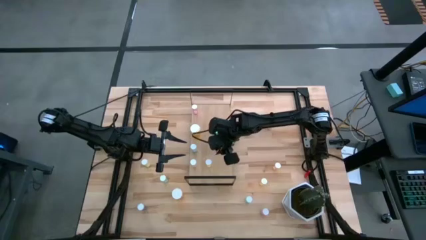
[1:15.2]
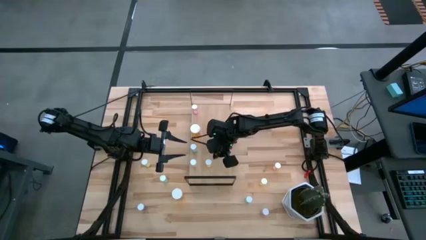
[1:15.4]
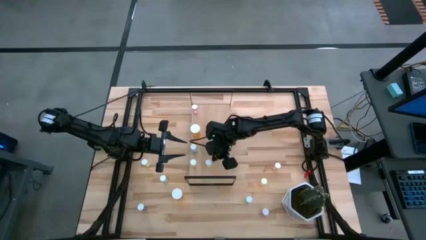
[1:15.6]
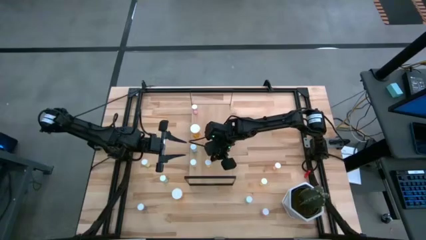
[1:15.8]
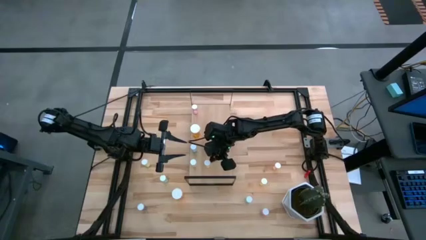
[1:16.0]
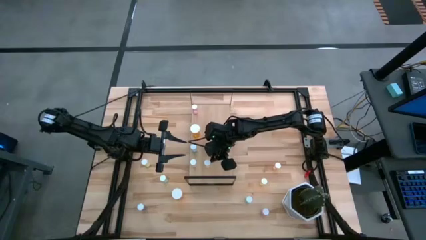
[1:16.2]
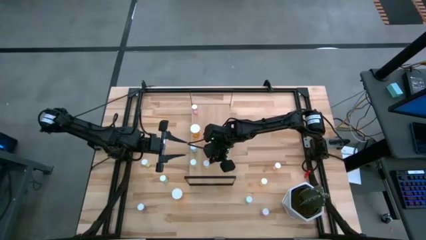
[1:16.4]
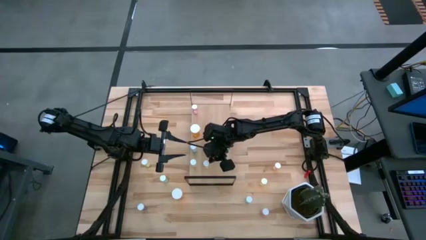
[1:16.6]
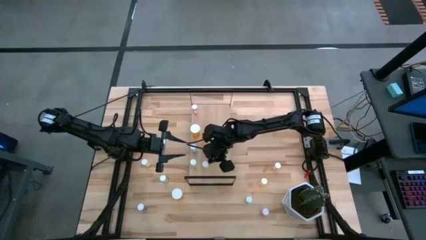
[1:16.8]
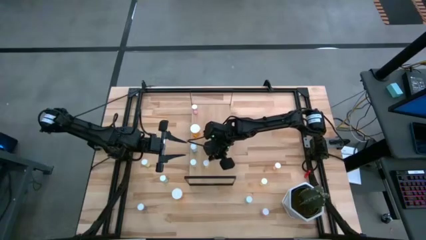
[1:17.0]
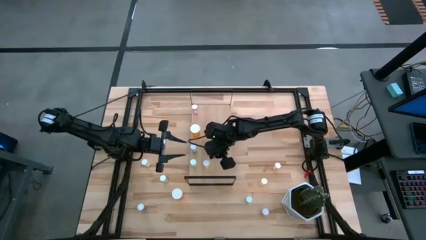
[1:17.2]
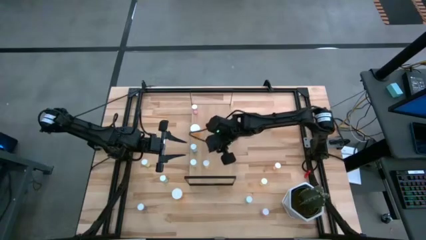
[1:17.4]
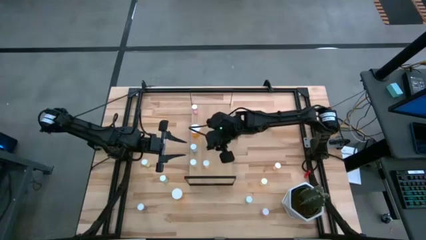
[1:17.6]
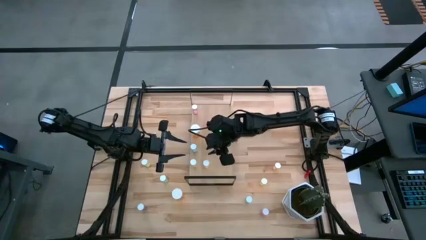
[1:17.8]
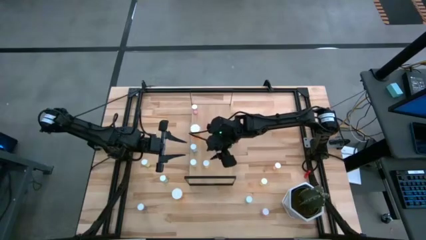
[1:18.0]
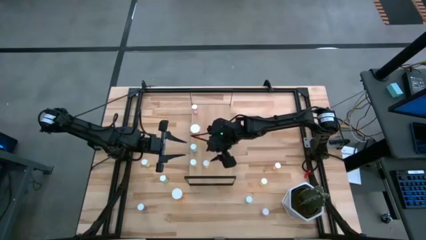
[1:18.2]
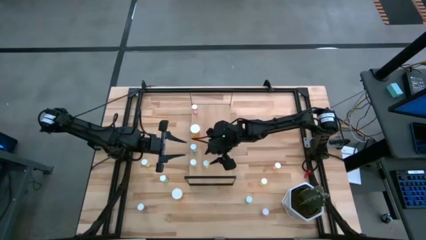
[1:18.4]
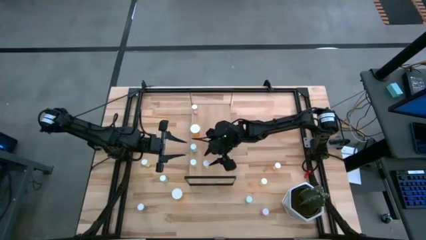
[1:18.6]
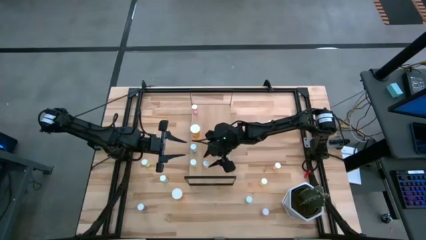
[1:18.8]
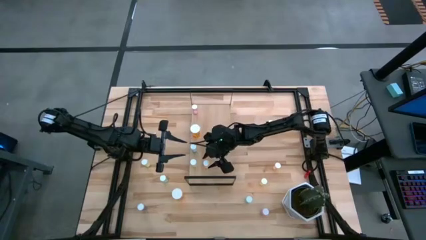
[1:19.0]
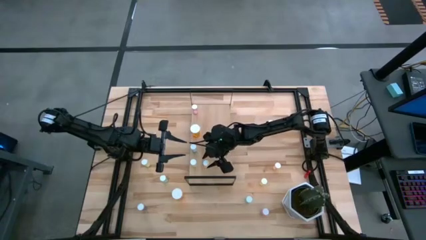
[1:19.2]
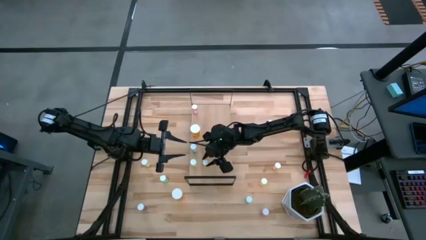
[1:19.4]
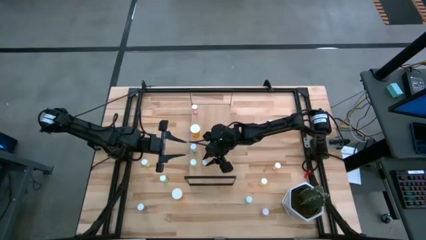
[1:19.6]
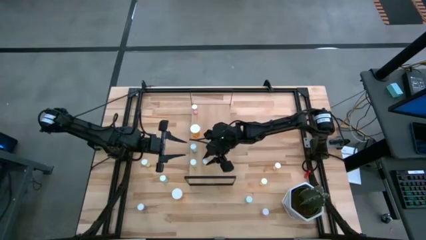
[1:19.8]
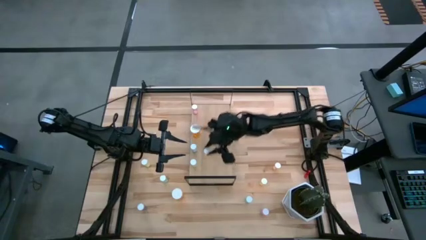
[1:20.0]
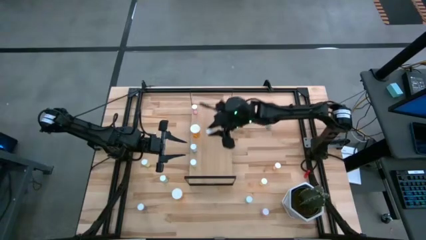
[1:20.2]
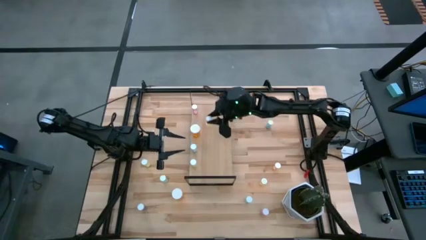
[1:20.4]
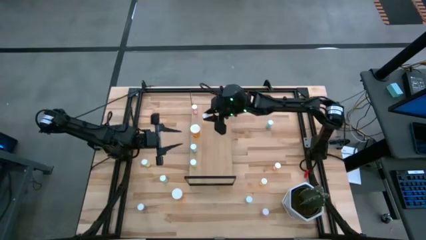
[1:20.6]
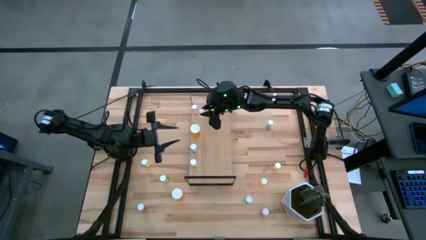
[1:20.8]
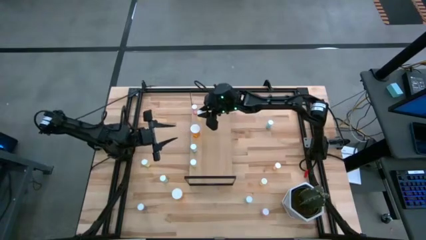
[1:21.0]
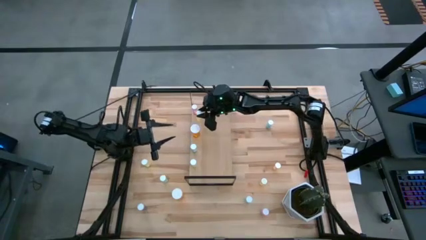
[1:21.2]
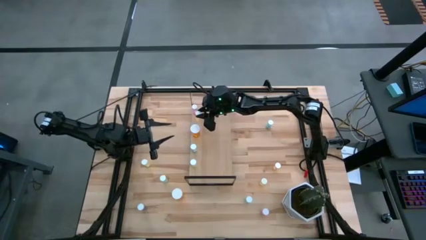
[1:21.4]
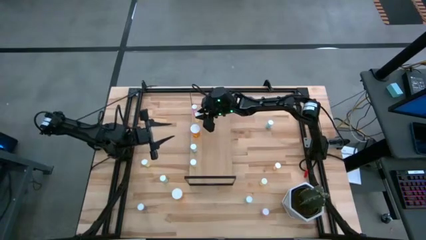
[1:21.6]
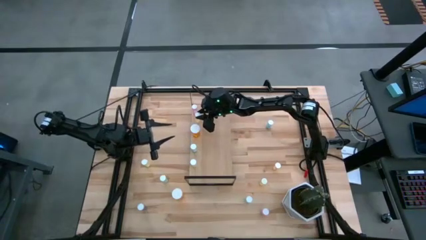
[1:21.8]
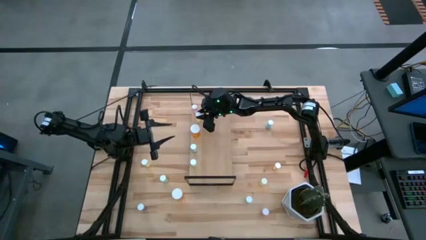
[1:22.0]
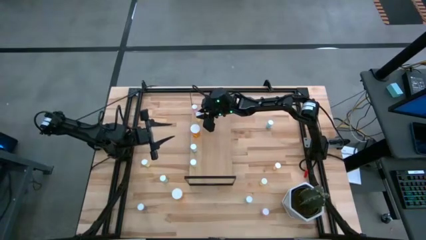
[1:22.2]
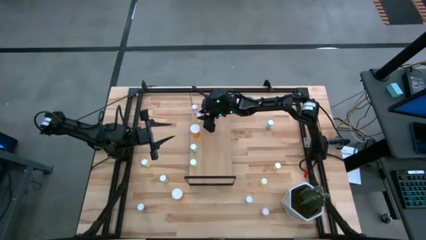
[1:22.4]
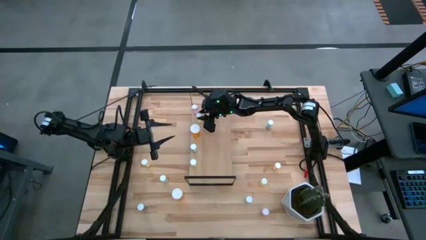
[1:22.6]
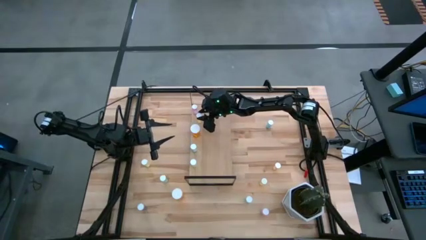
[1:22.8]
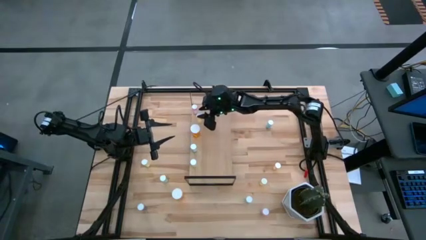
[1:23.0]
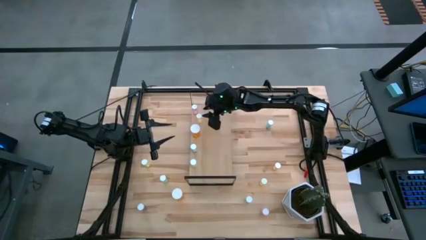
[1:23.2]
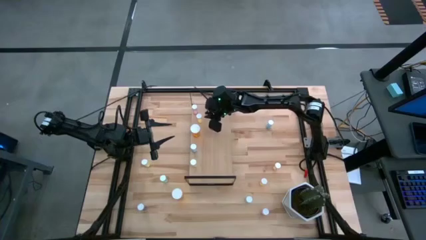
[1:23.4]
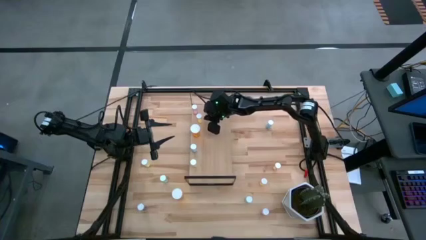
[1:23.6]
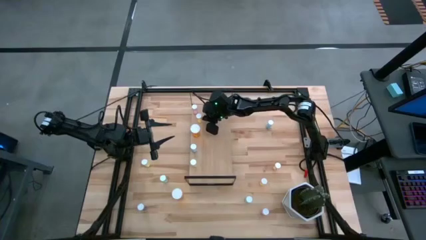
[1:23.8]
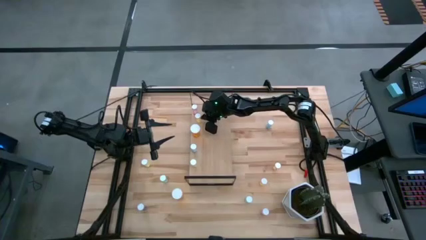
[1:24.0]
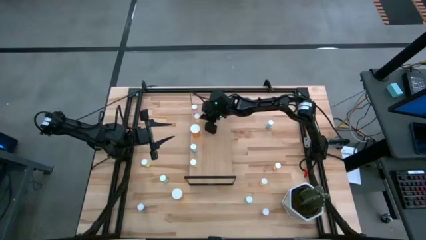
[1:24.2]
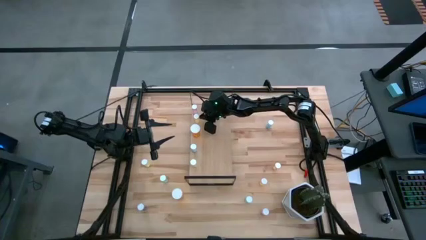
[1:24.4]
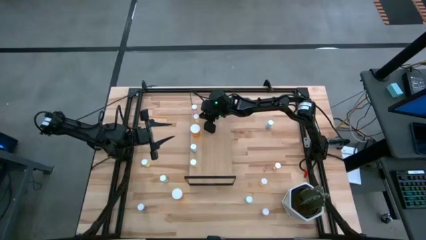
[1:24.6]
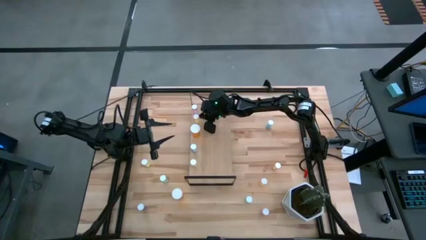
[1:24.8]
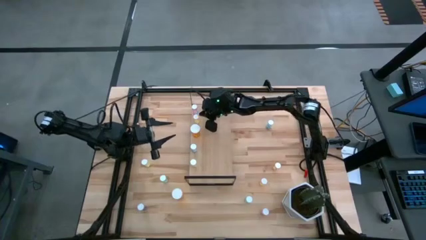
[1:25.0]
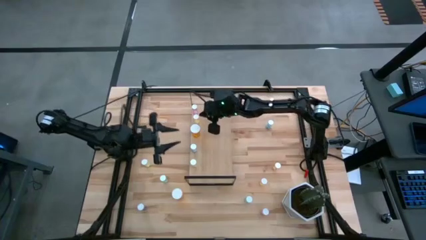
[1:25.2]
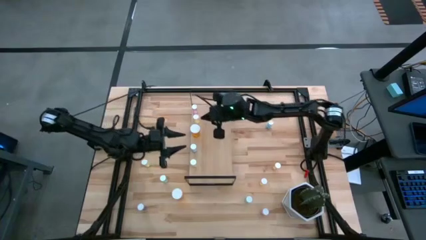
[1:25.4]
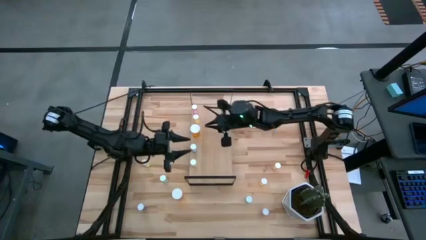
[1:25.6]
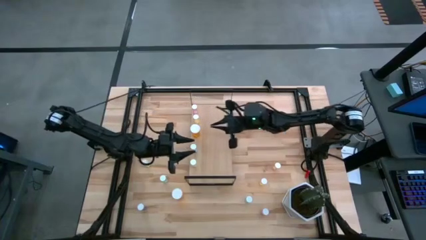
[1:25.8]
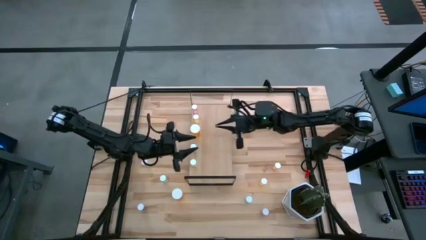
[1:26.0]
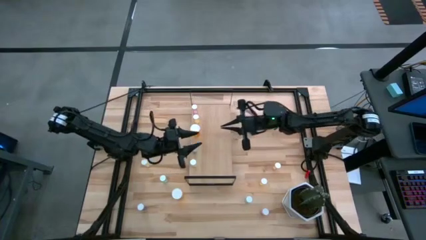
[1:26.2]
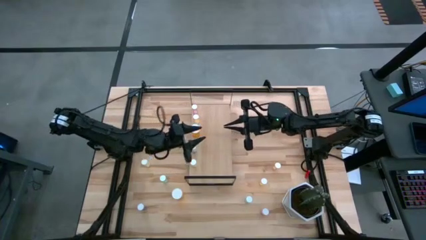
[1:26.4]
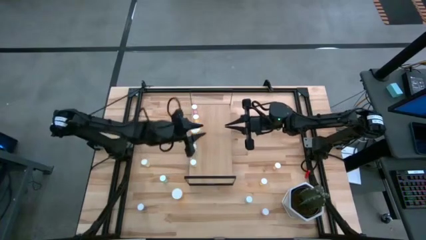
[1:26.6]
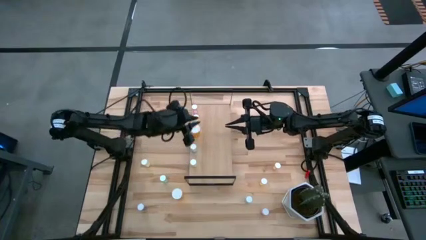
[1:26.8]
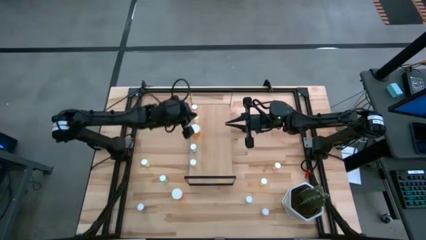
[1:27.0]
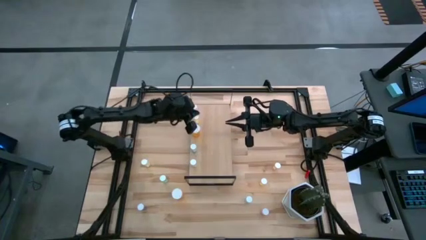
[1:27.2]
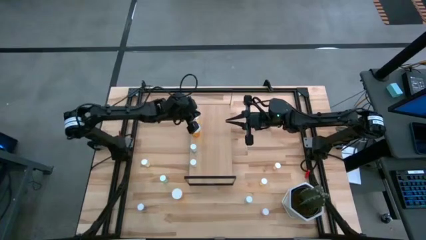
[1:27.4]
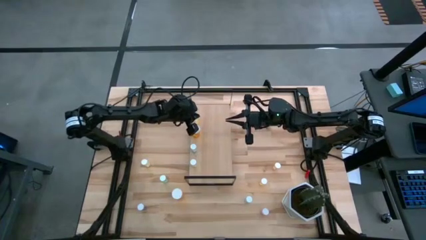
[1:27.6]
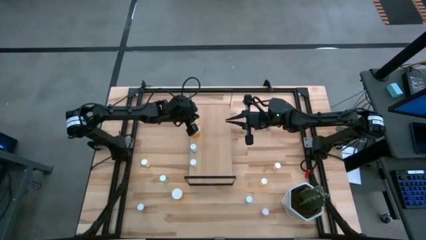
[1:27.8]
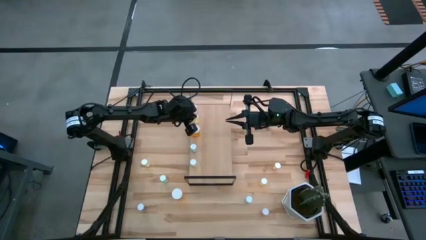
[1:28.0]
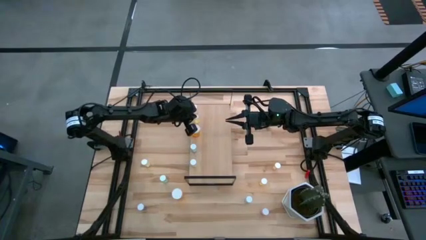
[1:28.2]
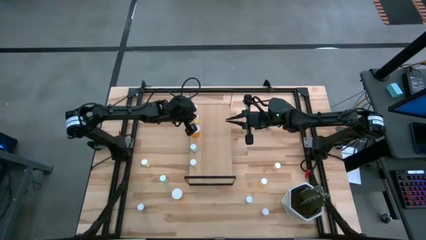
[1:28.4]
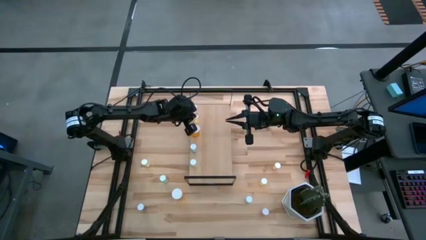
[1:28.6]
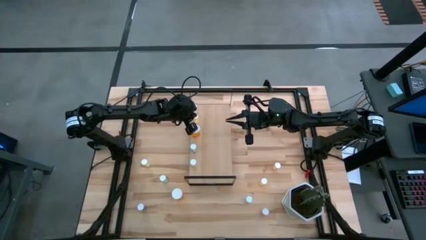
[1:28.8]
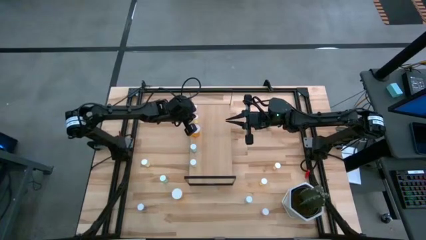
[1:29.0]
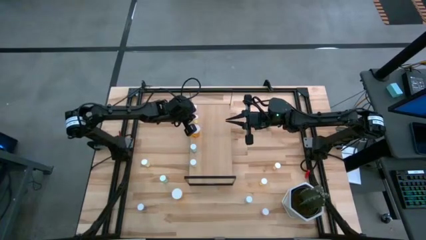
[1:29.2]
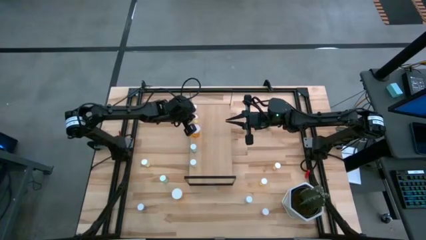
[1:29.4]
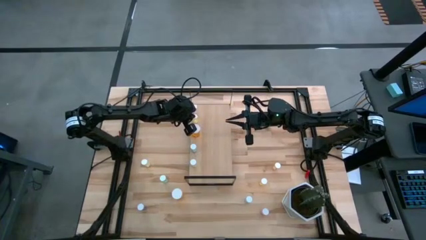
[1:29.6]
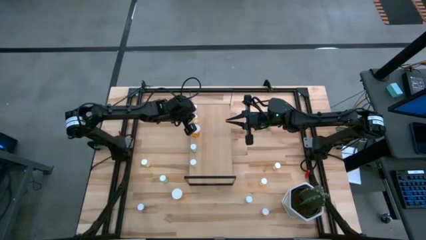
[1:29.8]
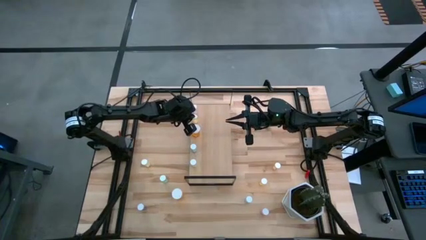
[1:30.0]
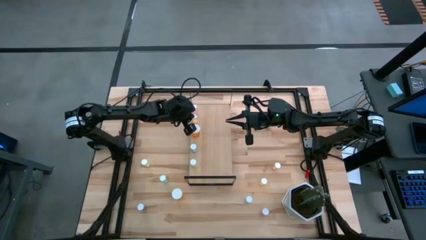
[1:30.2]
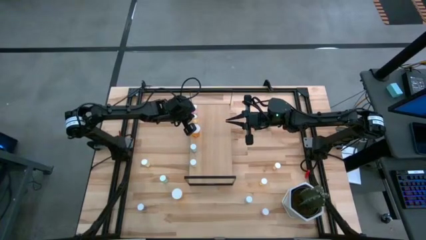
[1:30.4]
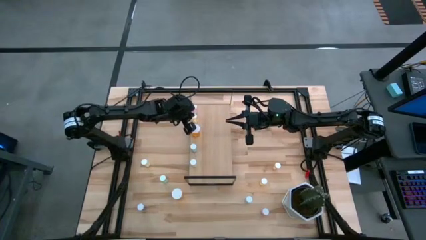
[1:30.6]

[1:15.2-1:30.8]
Task: Pick and place medicine bottles onto shelf by color
Put the yellow pill bottle on the shelf

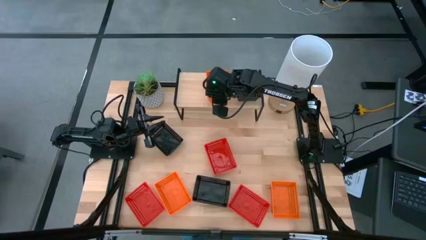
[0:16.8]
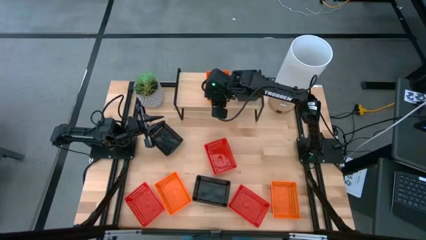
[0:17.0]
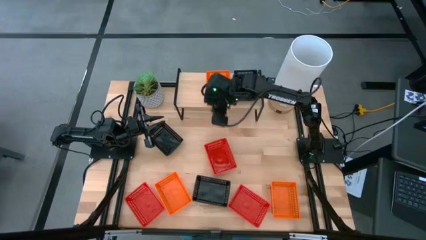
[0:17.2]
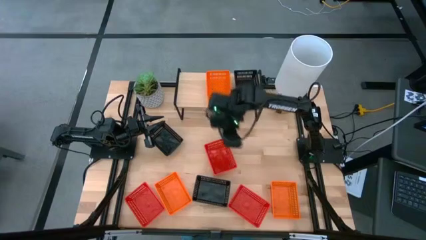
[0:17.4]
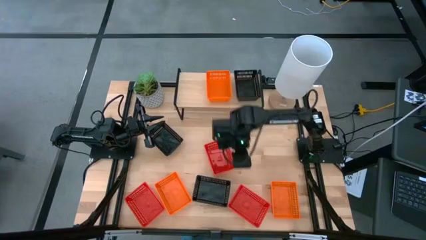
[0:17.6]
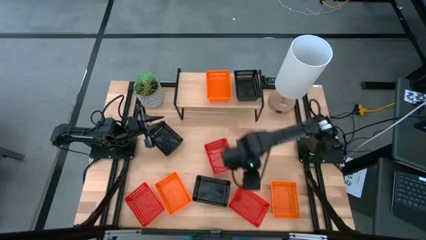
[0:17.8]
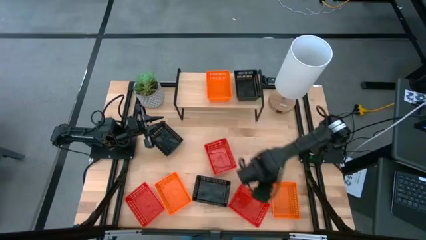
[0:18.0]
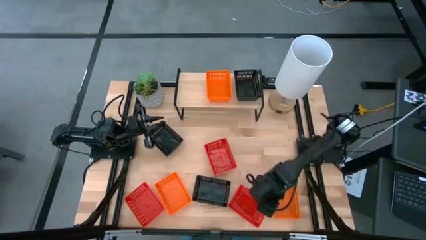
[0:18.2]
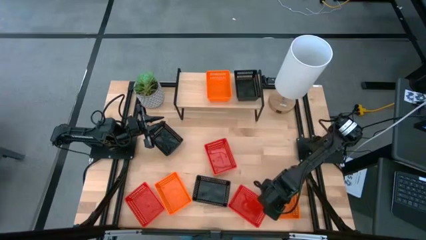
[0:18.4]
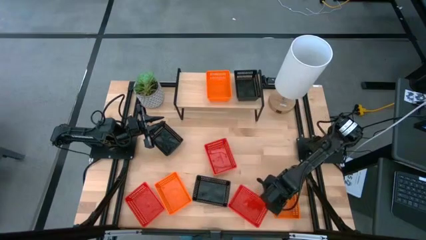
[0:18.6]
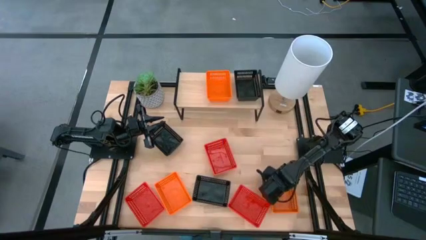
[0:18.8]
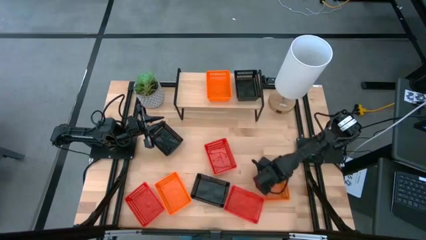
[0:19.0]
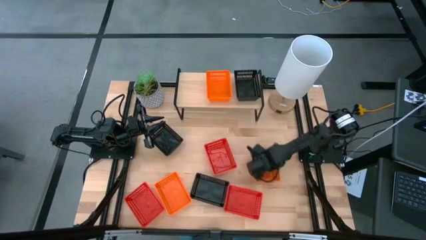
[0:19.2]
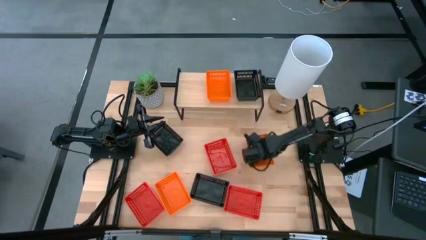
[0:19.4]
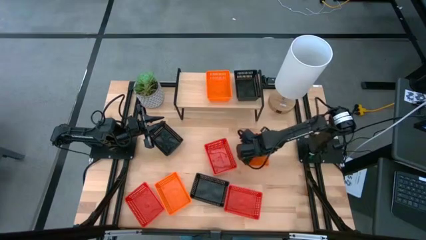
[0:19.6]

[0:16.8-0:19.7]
Task: Stack baskets on shelf by color
Move the right orange basket to the center of the table
